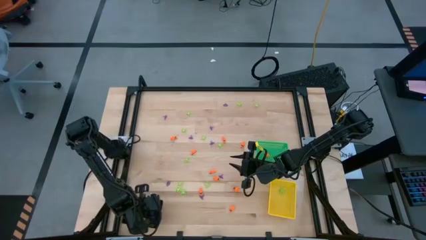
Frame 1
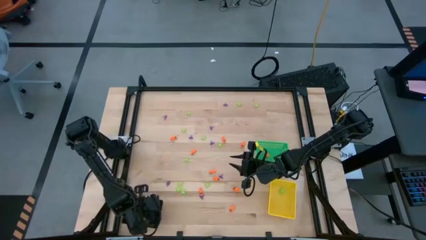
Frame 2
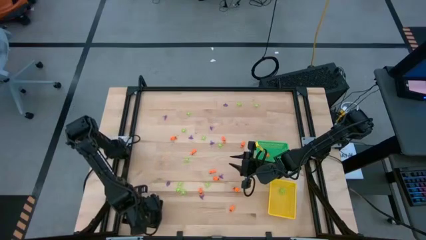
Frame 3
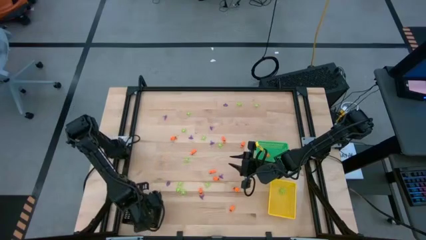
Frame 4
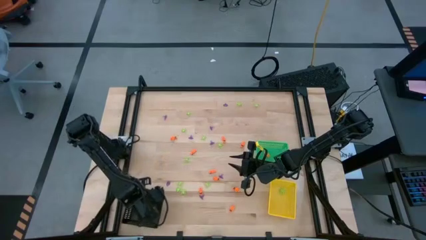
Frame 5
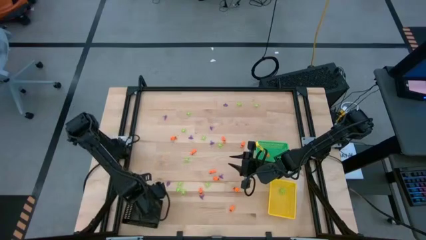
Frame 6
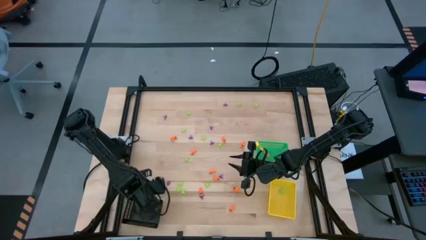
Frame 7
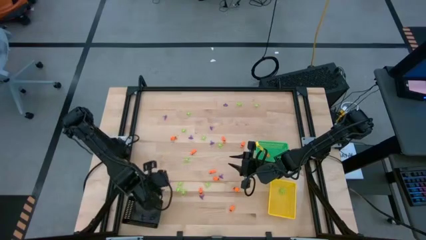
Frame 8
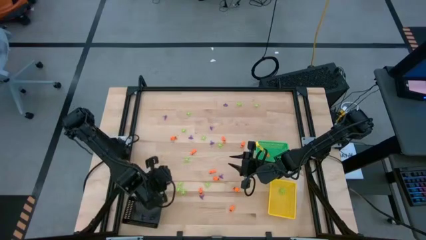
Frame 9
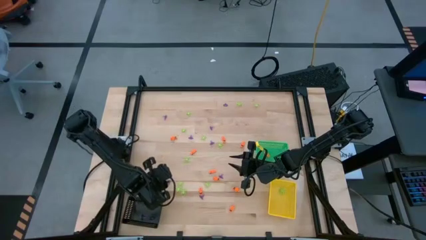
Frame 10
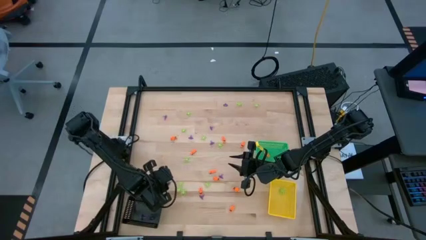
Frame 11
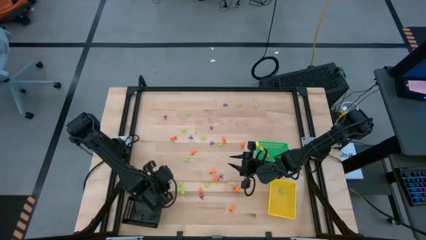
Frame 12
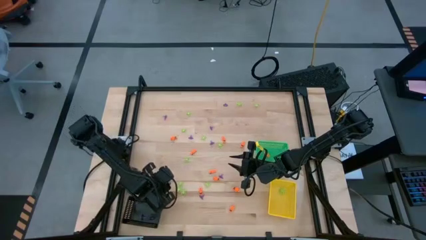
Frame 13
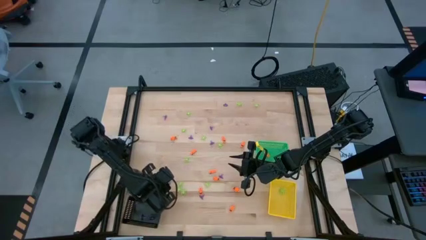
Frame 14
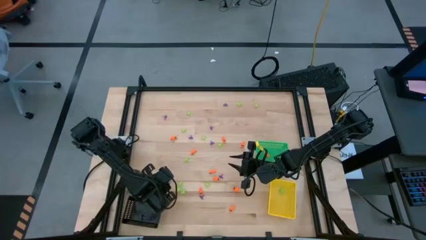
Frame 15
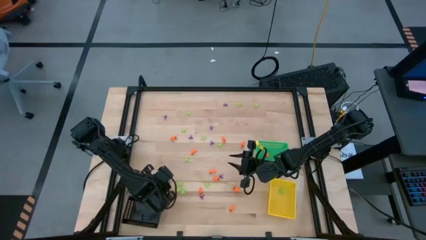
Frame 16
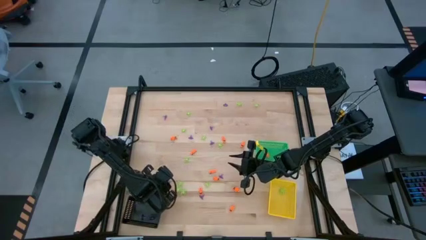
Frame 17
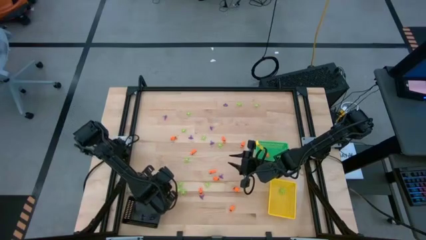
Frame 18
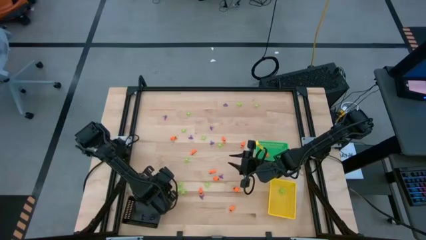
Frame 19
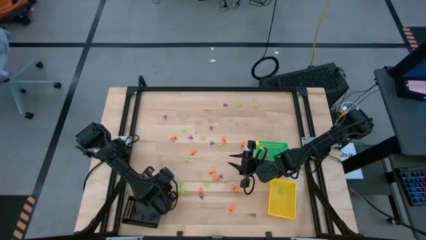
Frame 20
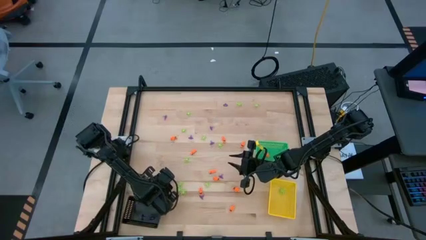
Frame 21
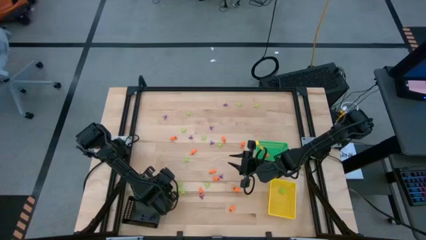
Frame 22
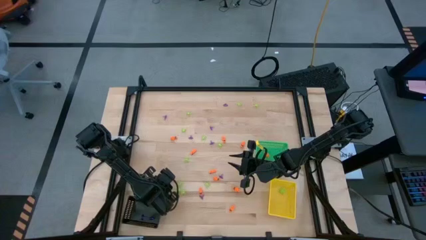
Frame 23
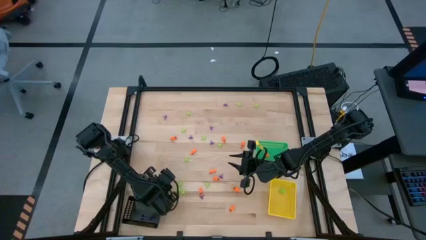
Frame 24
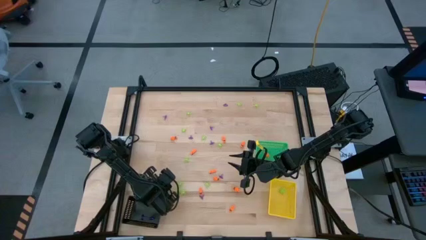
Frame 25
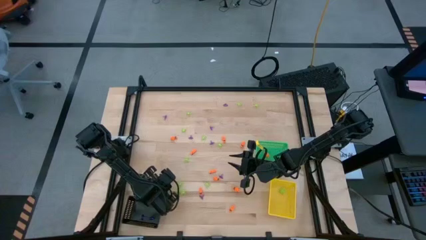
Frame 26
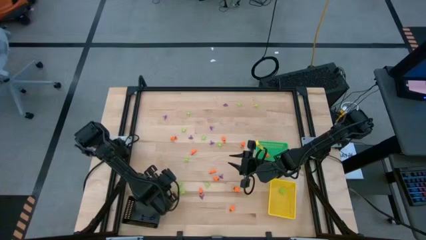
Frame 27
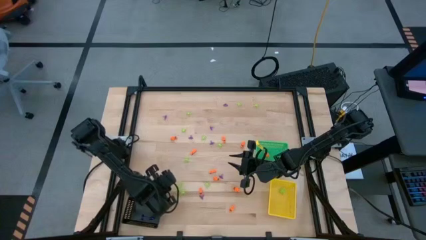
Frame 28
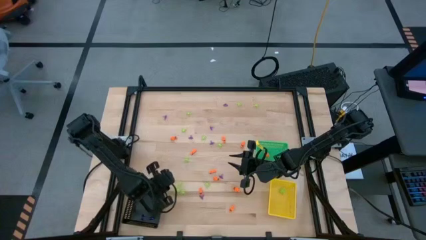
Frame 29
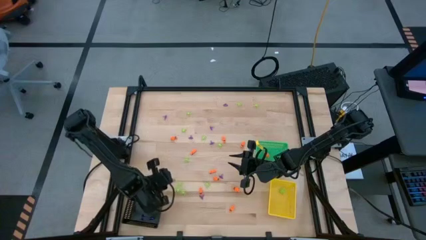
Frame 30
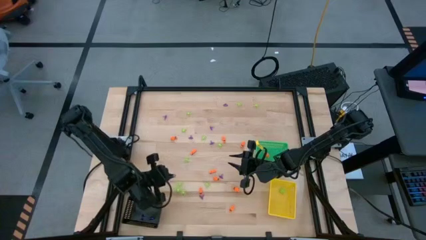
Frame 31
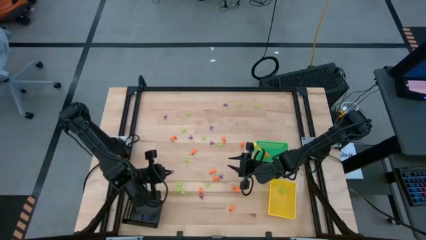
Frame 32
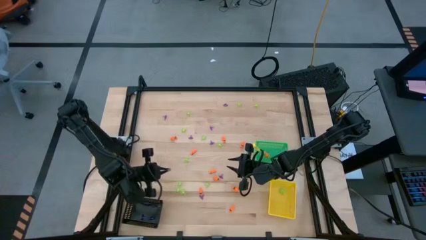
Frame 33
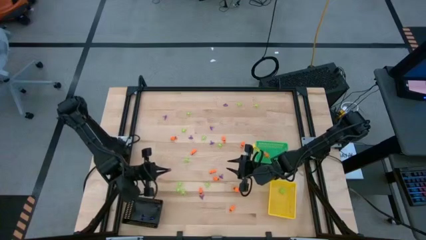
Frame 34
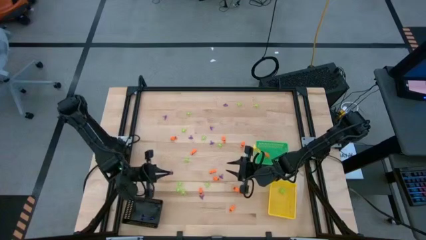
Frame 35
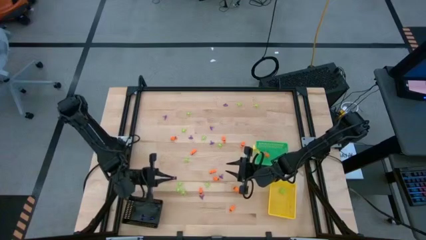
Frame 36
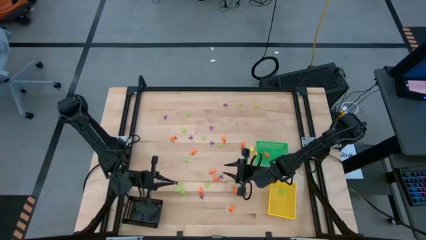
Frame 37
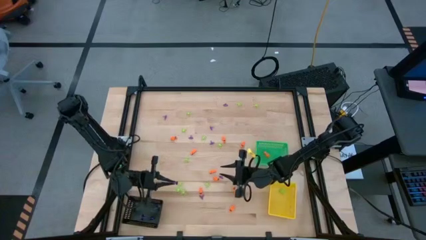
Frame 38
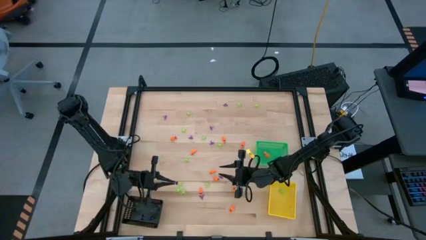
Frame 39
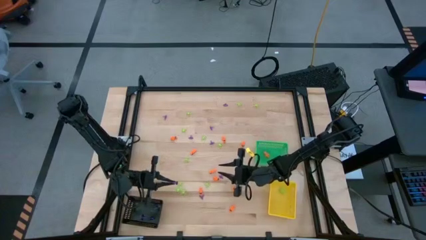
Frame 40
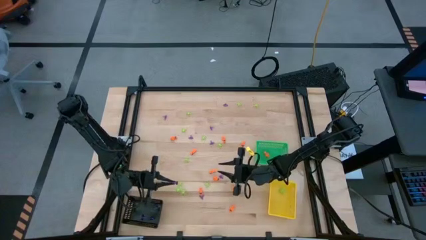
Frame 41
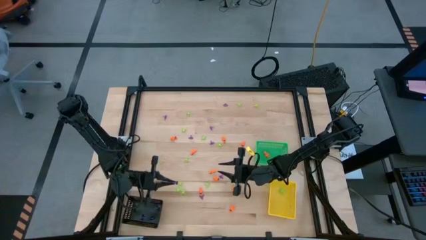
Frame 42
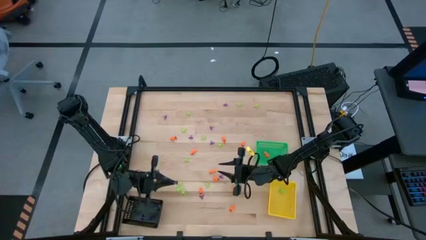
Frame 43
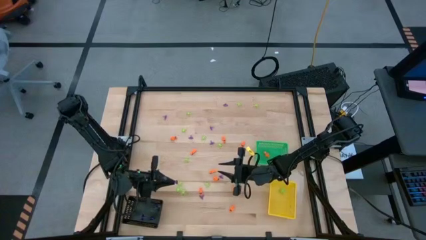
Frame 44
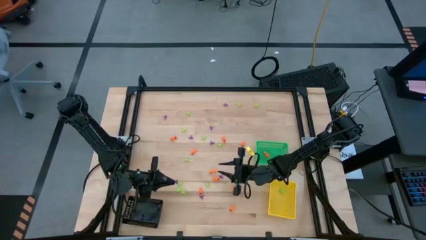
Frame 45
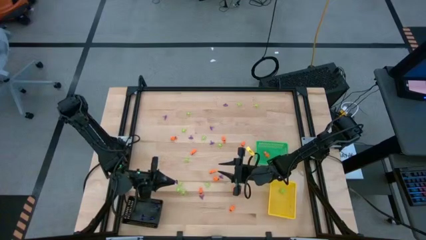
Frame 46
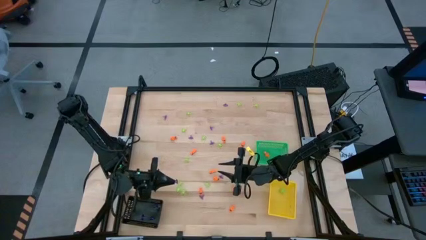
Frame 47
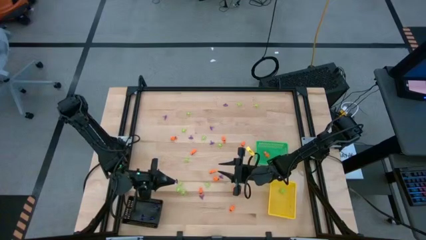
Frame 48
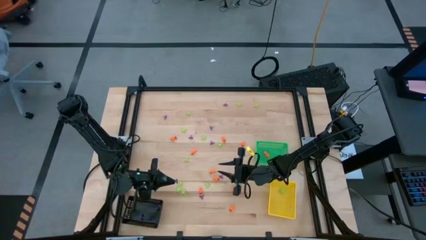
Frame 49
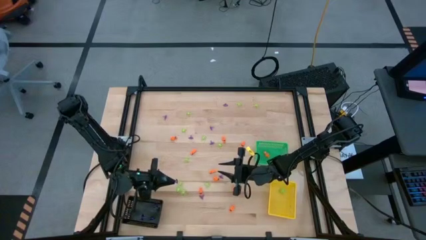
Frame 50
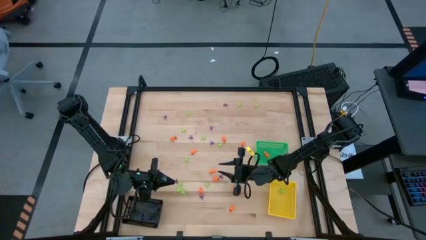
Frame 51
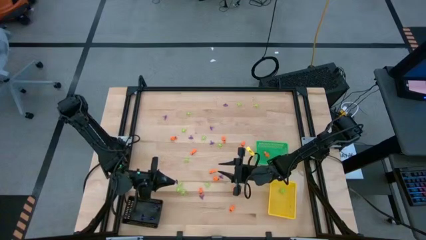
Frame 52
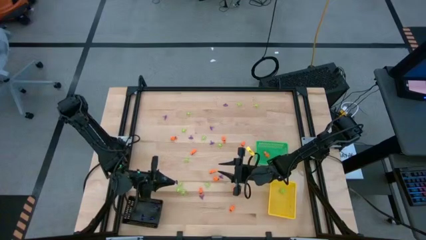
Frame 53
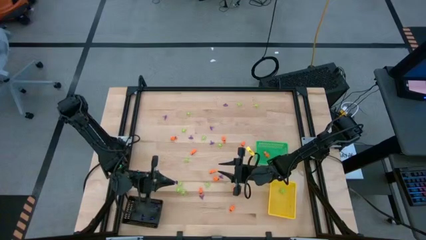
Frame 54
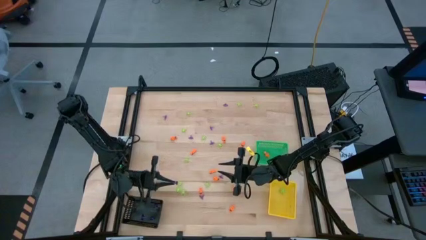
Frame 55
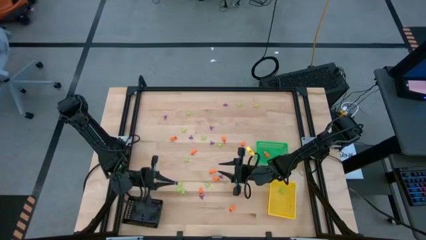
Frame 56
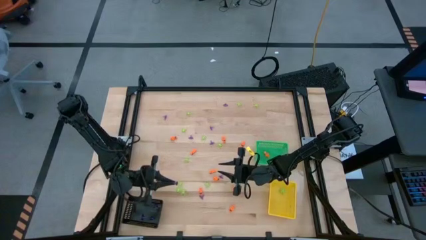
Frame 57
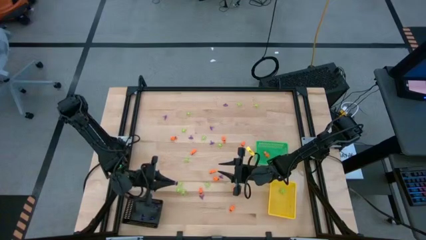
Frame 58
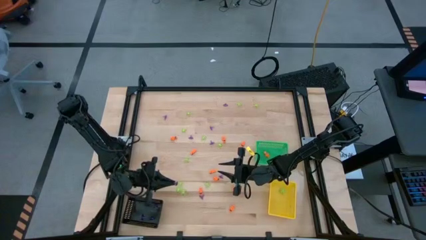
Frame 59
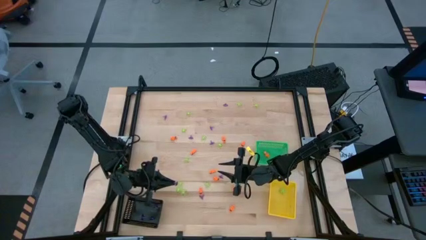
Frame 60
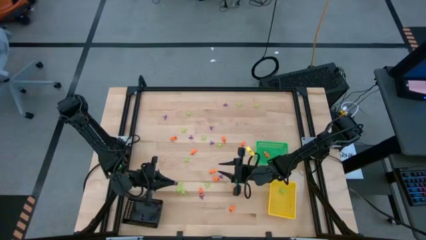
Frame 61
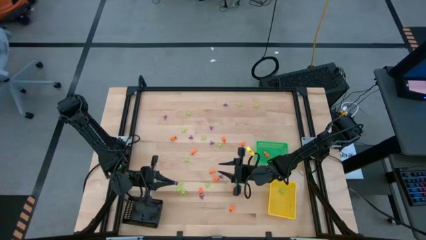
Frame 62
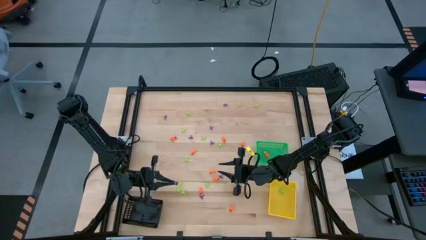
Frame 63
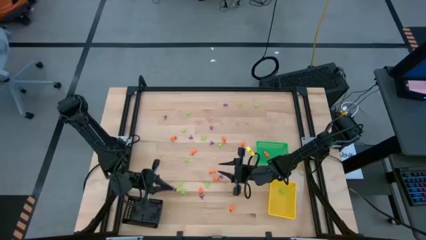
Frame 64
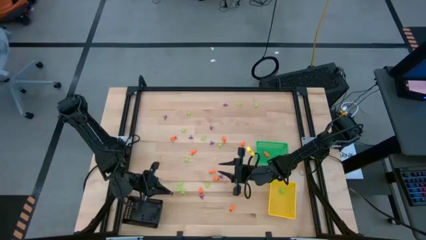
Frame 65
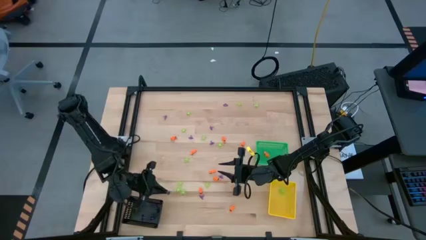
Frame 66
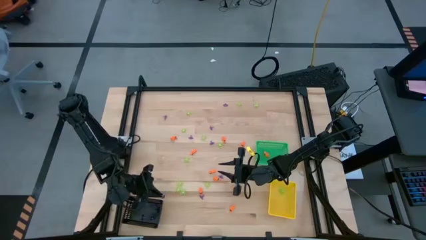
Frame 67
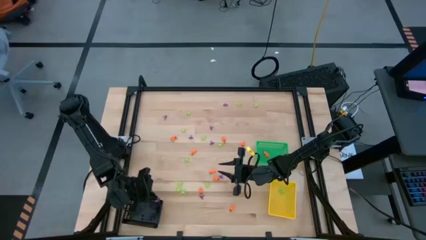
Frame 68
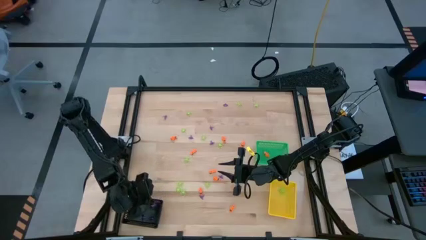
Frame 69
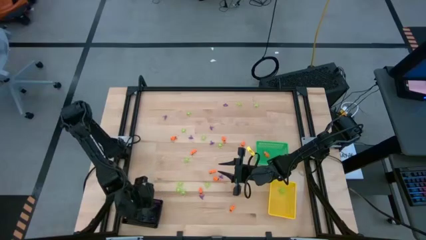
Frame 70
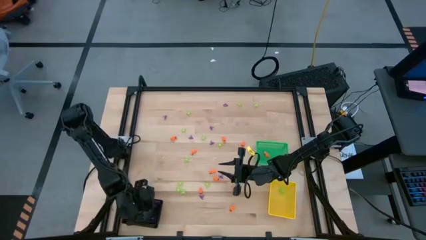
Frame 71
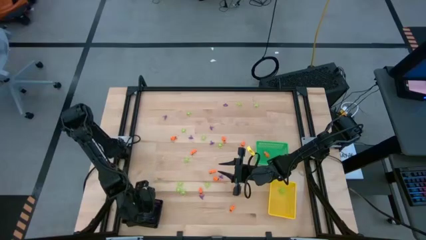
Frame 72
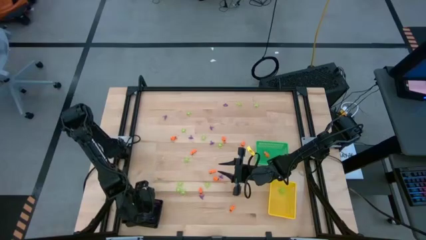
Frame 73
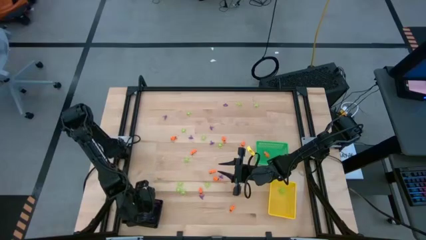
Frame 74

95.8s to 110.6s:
Task: Sort Halloween decoration
Put the purple witch hat toy into the black bin
